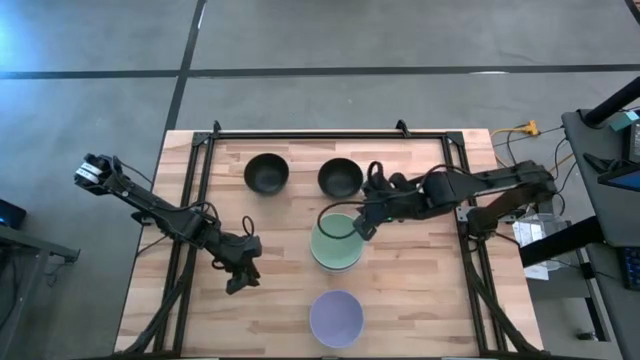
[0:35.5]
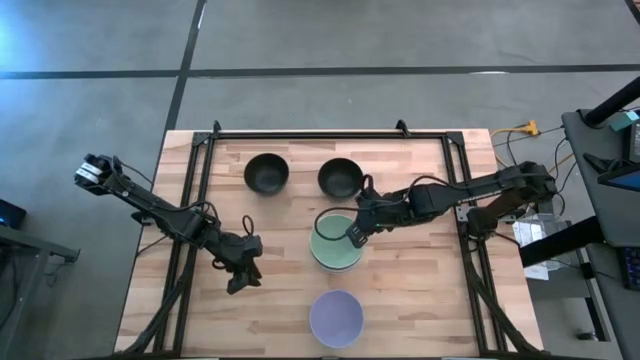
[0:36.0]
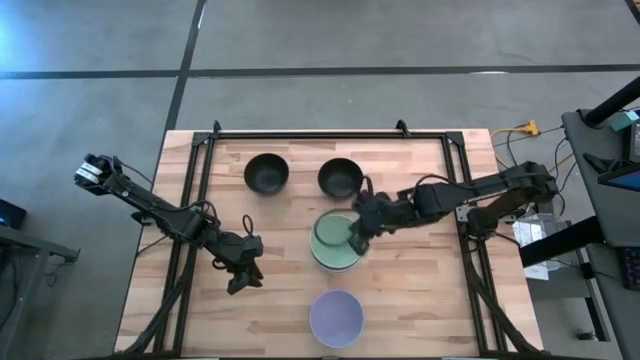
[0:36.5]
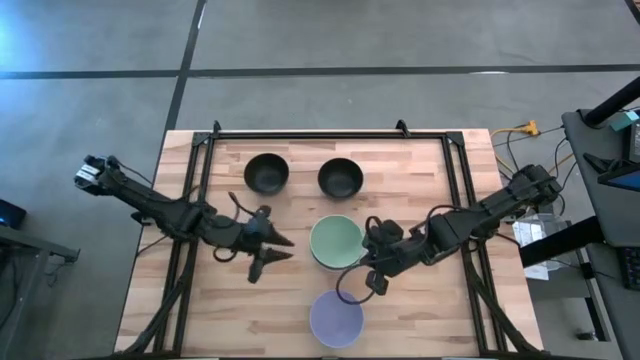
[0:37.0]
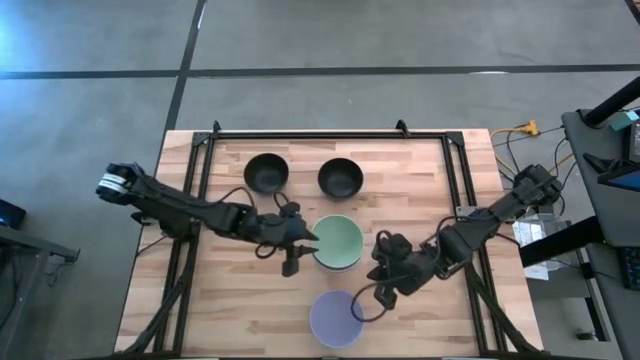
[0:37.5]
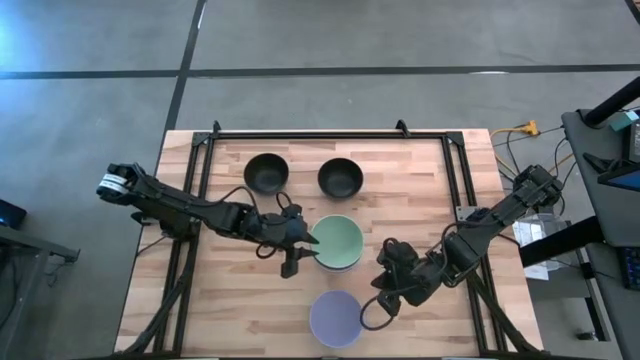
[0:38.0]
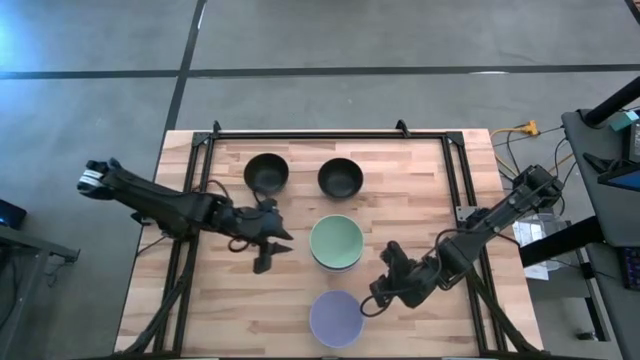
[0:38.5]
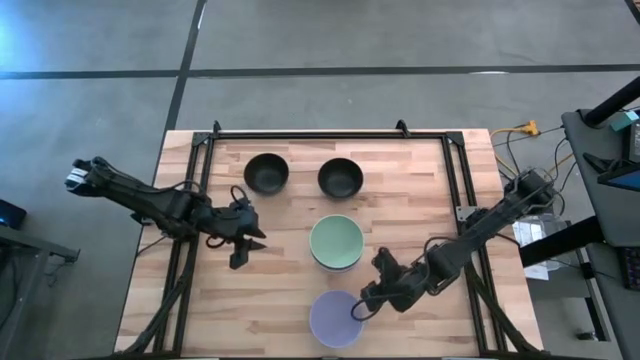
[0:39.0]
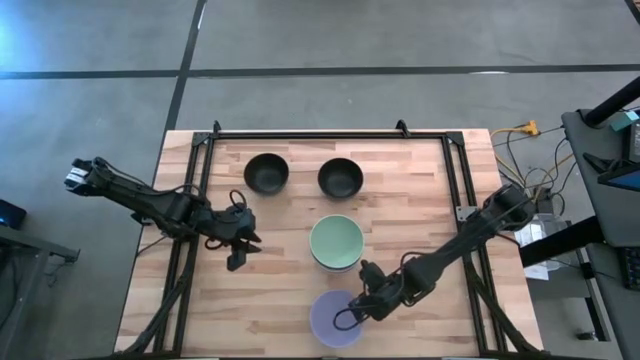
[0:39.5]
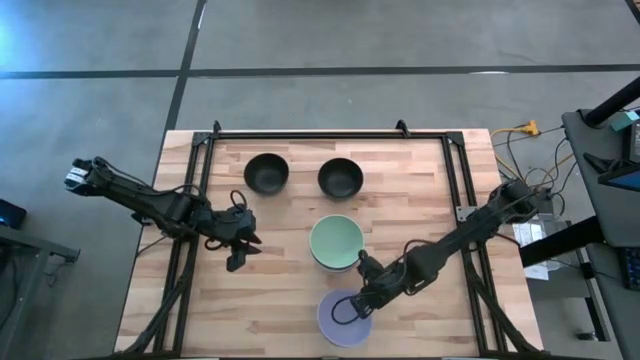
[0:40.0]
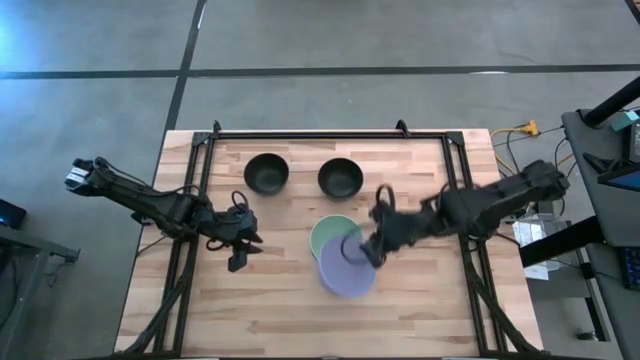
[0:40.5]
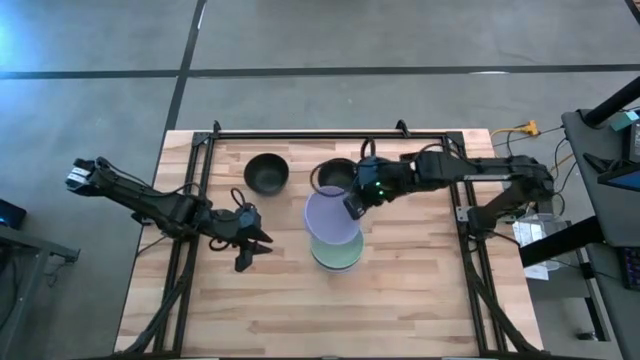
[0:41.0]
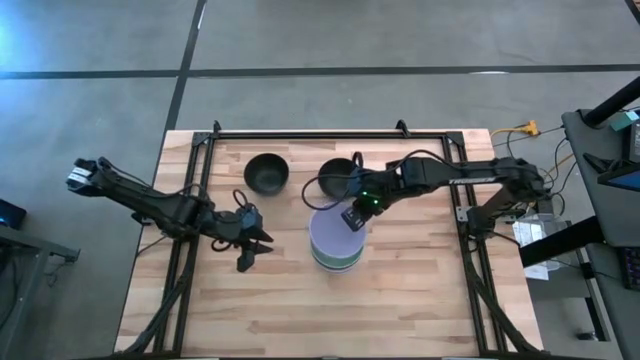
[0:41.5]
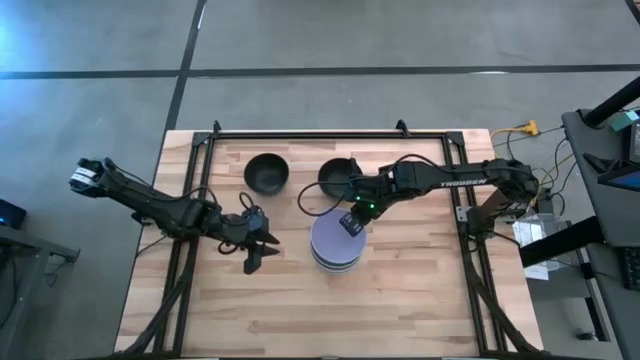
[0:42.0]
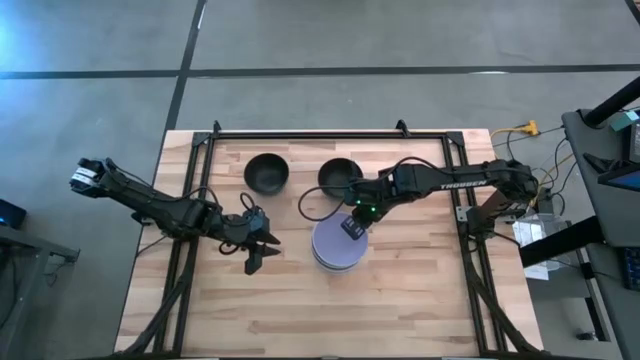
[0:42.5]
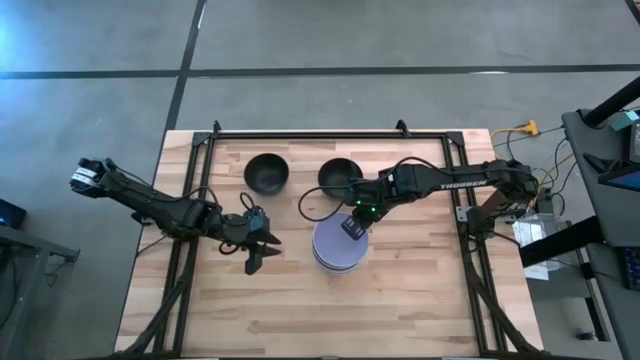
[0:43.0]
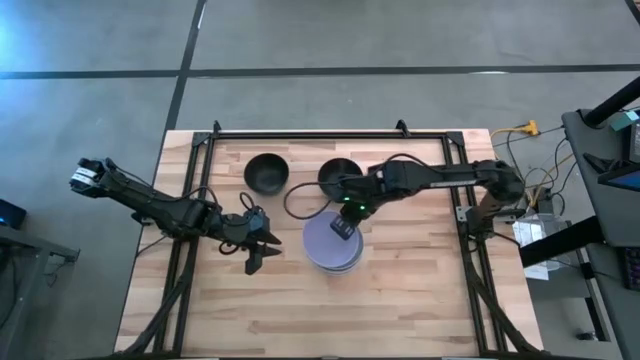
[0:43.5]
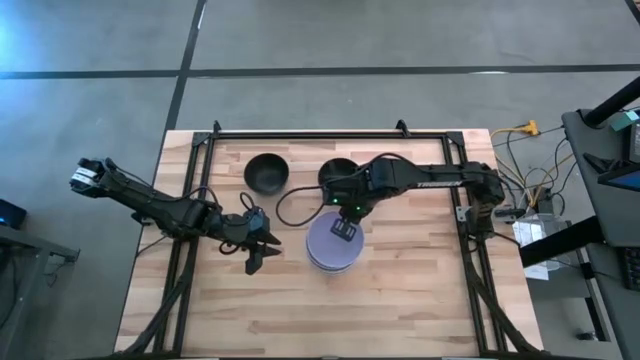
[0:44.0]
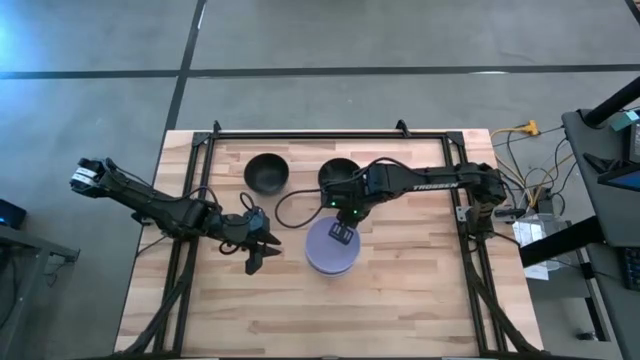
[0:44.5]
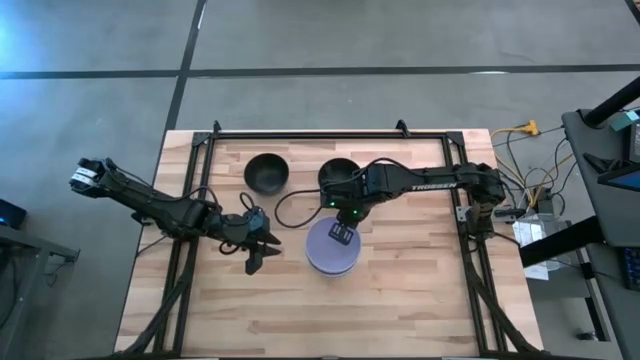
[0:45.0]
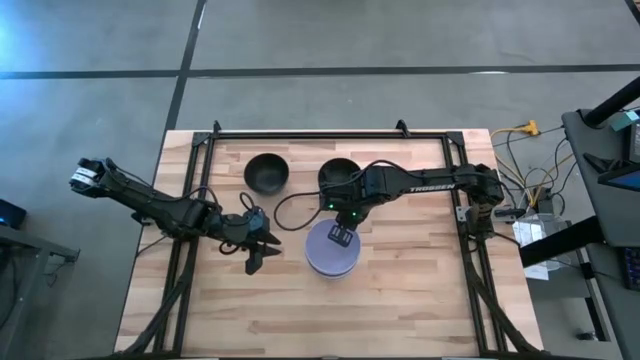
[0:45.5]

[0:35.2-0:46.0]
Task: Nest bowls inside each other
Stack the purple bowl on top of the light green bowl

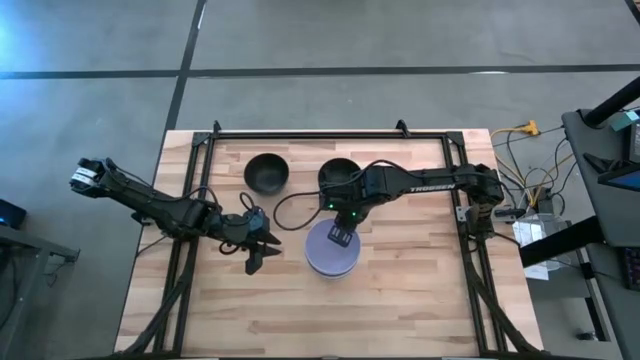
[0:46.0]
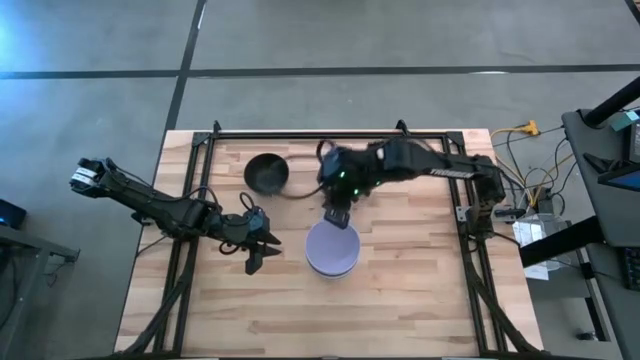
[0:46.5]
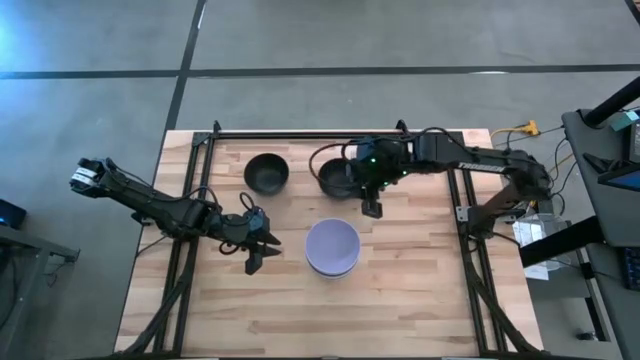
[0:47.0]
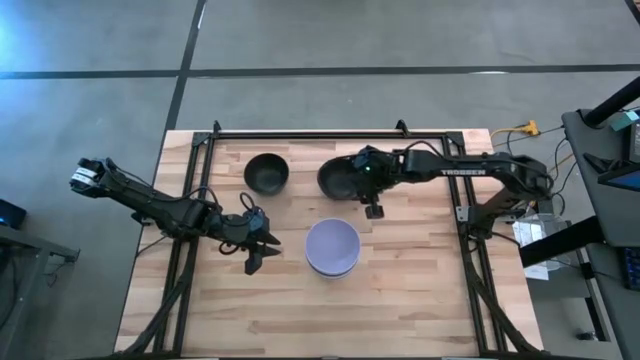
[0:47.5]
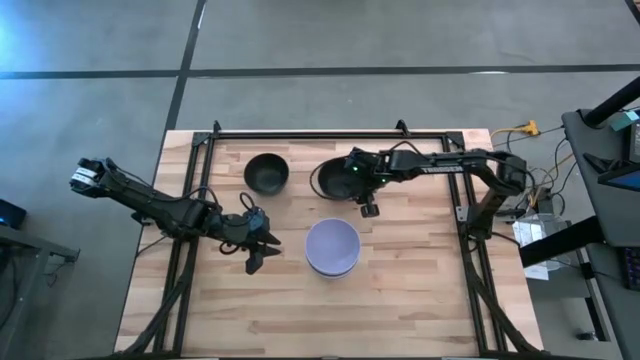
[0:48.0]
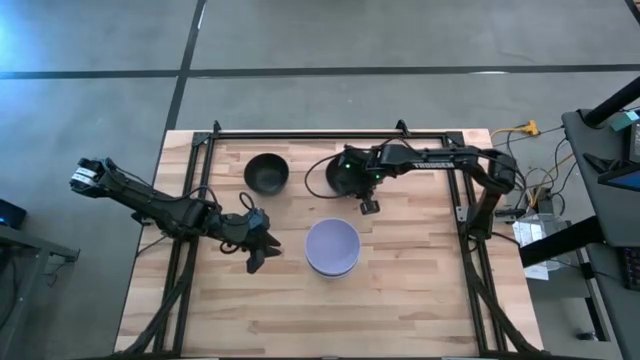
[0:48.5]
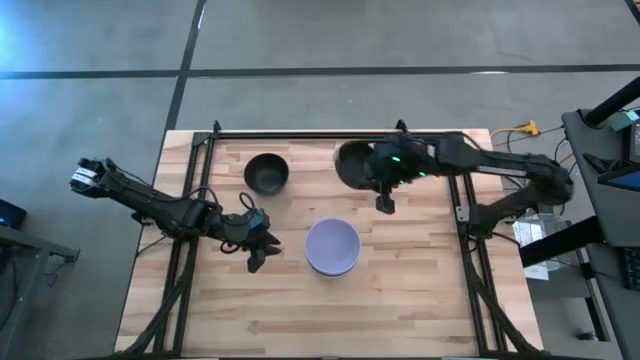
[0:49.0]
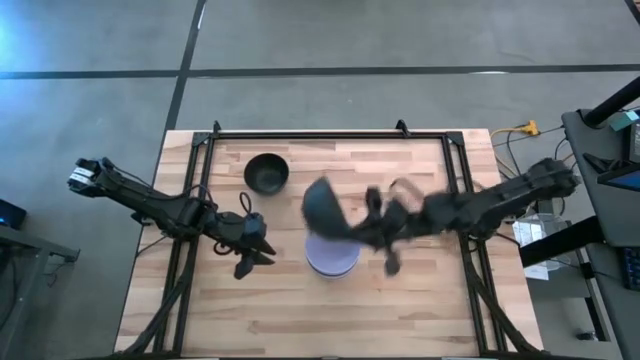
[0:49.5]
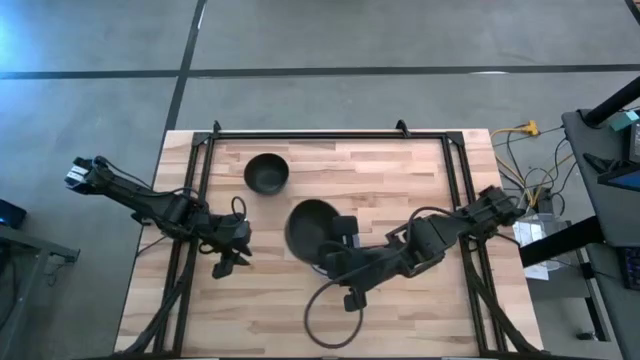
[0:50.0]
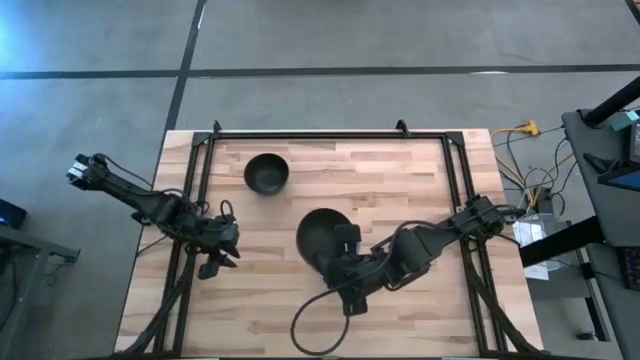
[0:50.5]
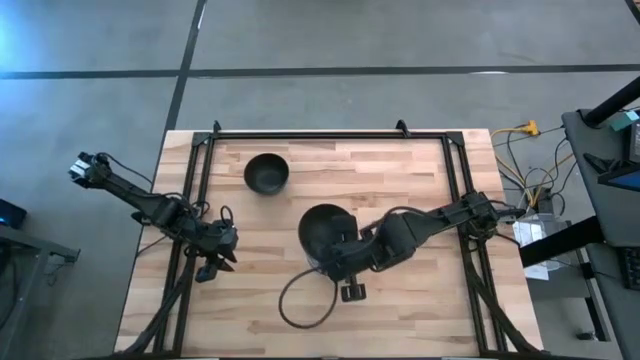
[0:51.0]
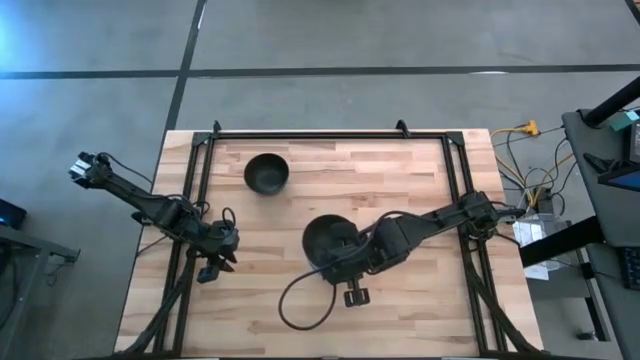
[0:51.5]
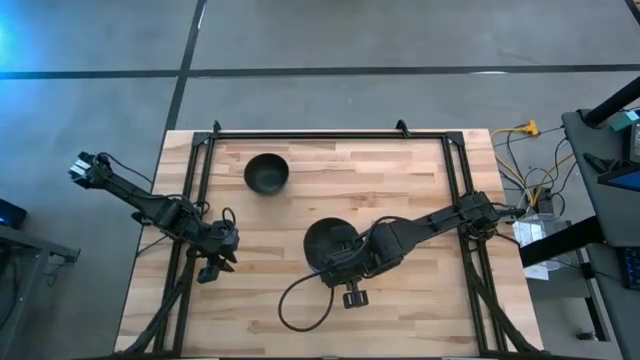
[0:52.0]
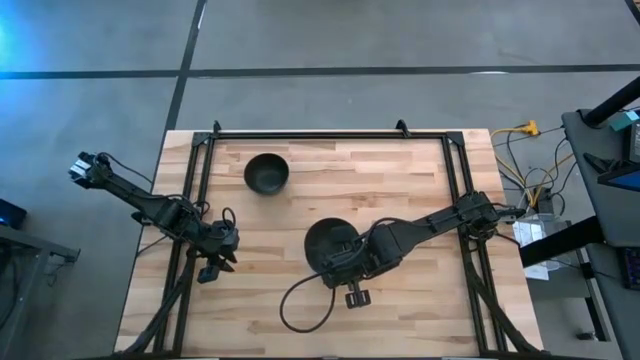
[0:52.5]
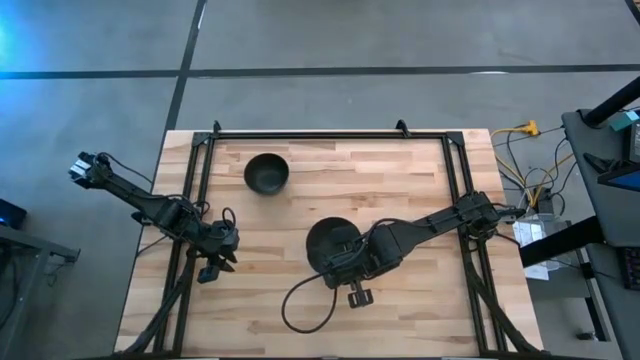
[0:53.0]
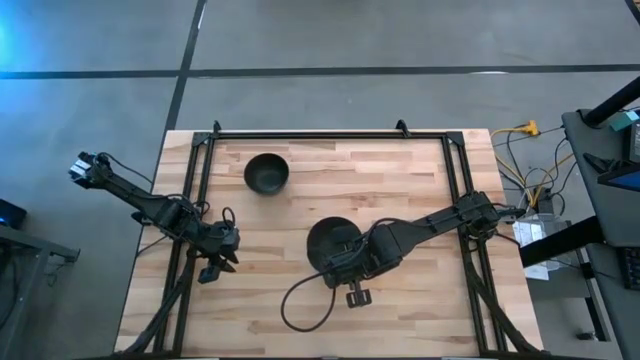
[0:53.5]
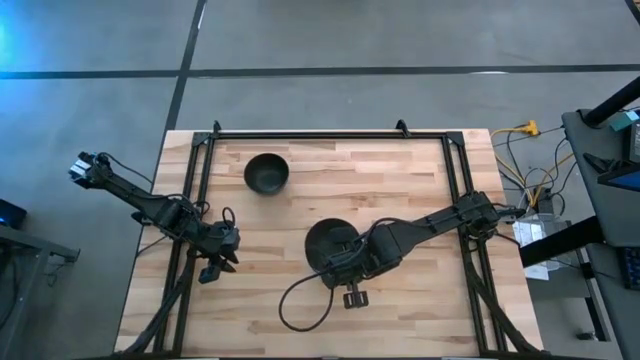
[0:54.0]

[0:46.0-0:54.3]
Stack the right black bowl on top of the purple bowl

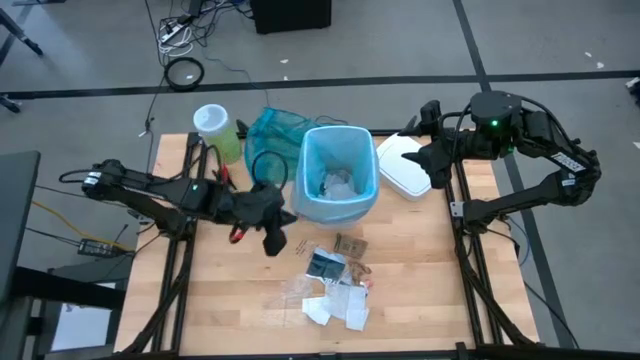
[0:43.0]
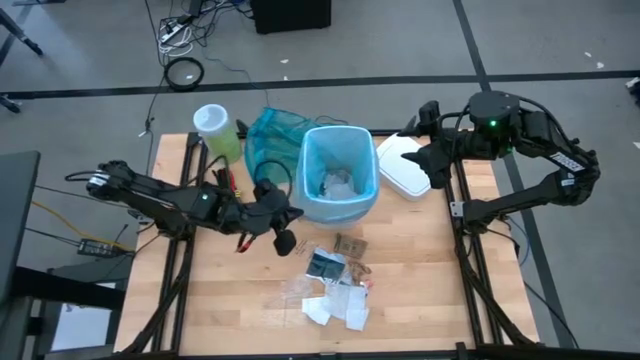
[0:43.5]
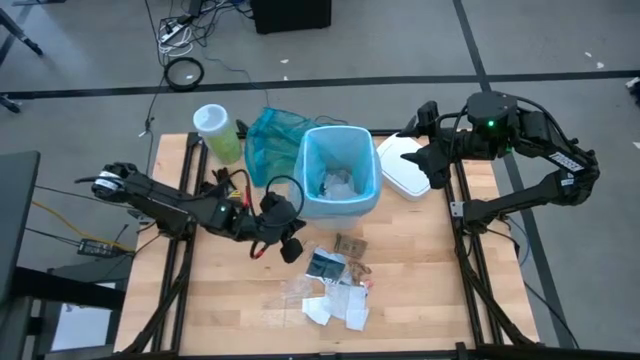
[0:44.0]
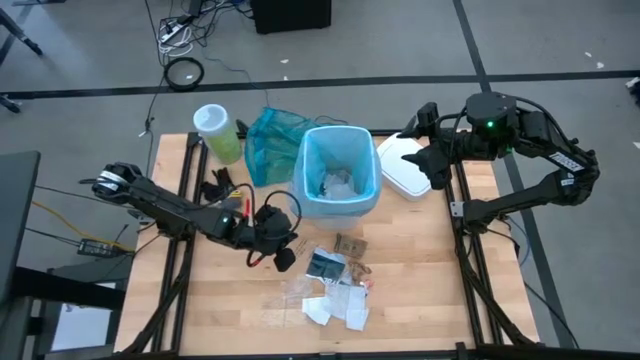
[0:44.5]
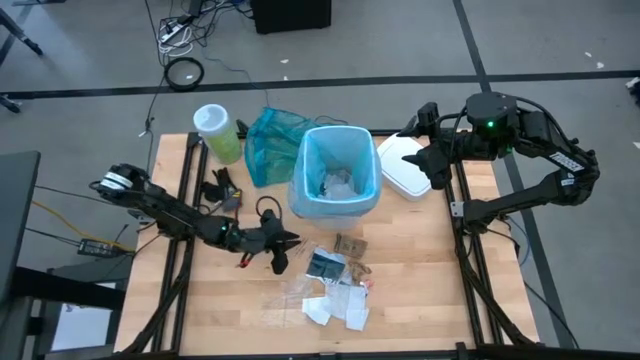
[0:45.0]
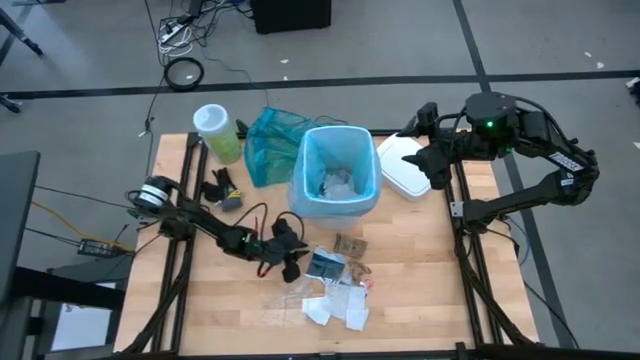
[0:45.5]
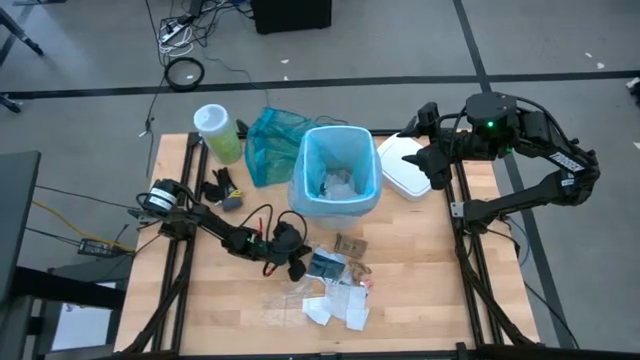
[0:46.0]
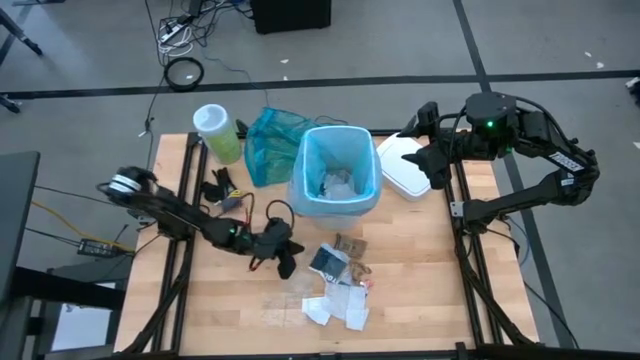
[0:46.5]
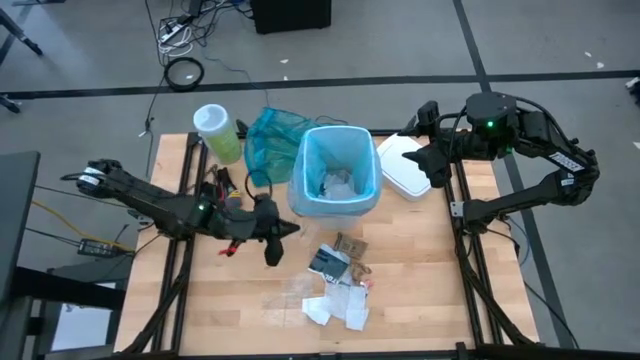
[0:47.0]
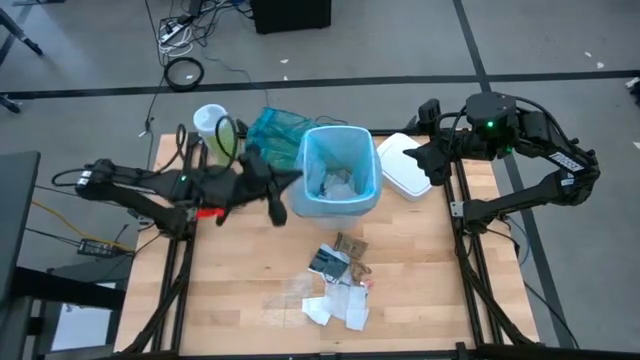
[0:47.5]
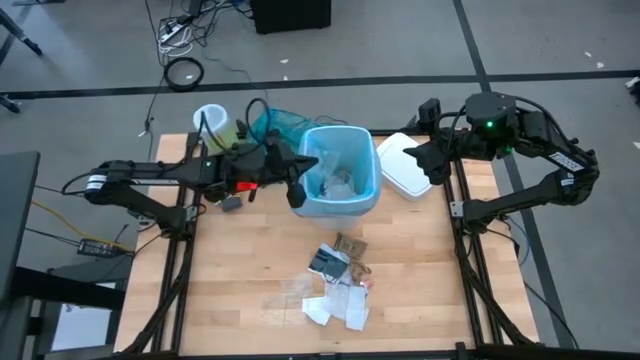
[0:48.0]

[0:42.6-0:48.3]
Task: place trash/remove bag and relplace
Put the clear plastic into the white trash bin
